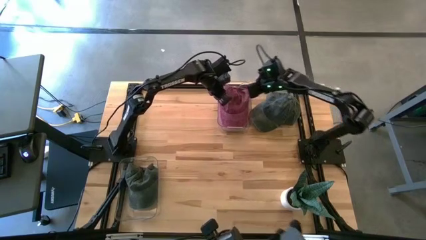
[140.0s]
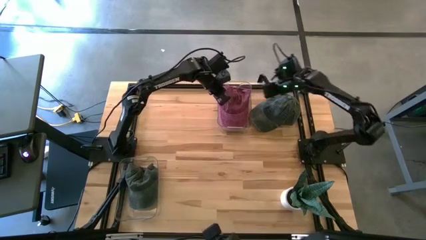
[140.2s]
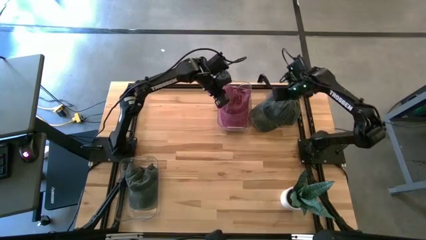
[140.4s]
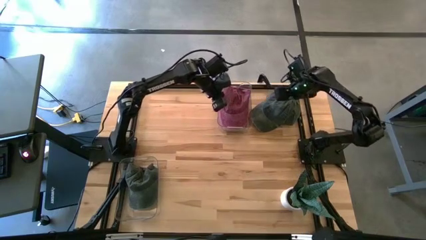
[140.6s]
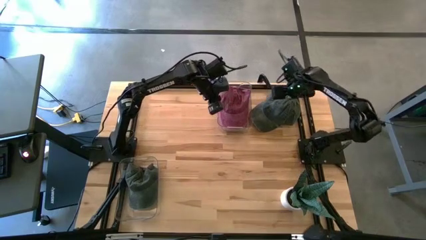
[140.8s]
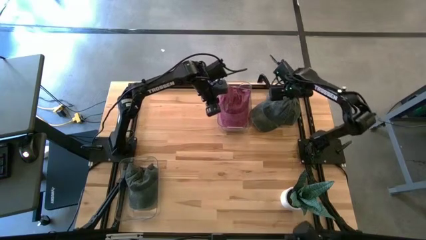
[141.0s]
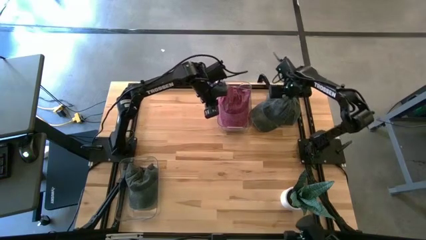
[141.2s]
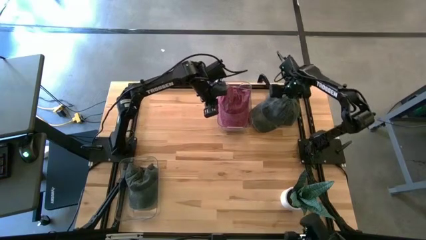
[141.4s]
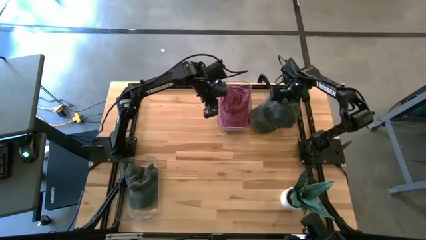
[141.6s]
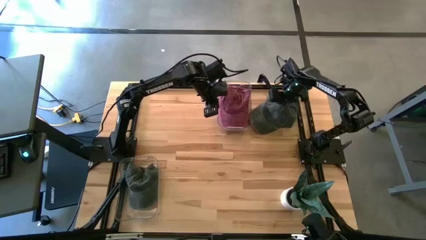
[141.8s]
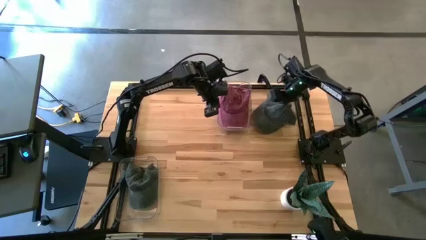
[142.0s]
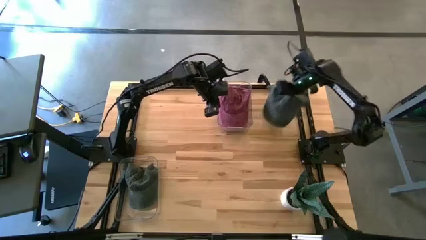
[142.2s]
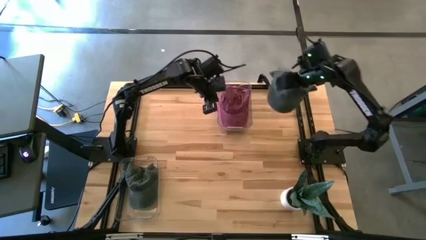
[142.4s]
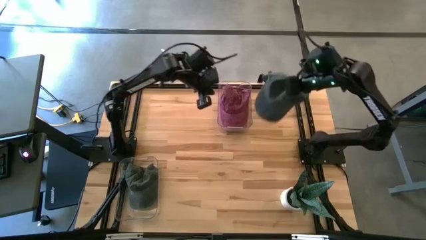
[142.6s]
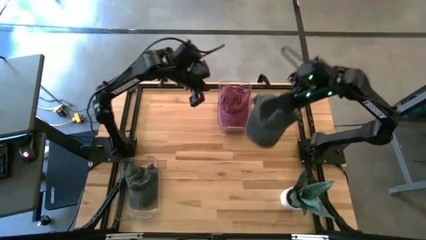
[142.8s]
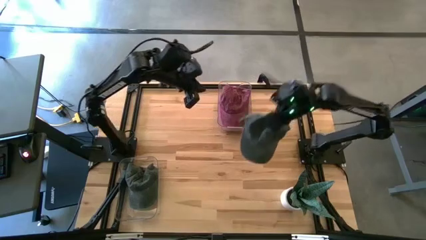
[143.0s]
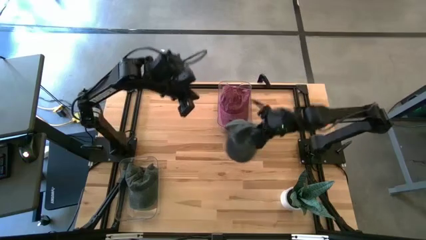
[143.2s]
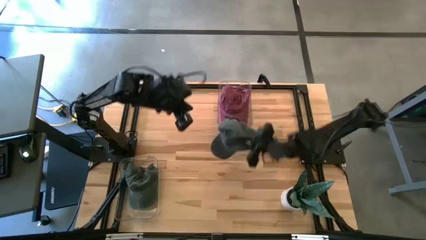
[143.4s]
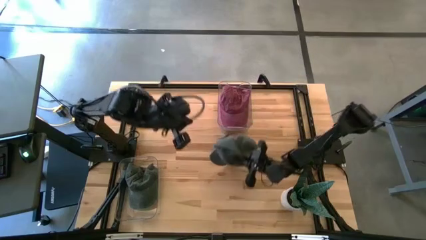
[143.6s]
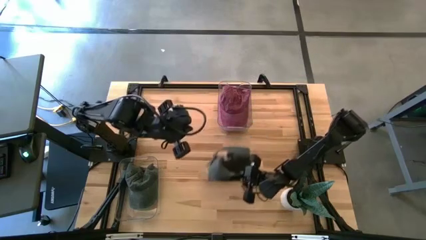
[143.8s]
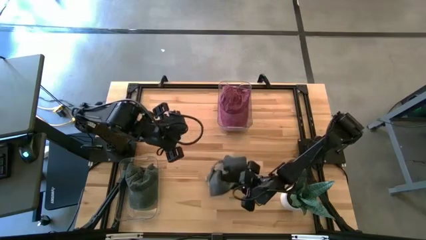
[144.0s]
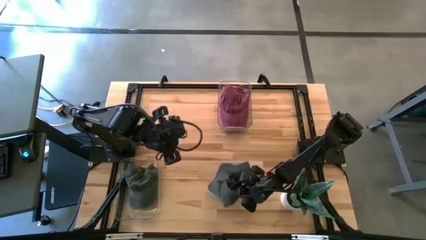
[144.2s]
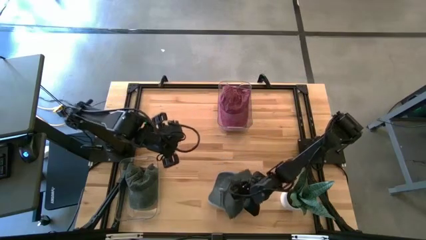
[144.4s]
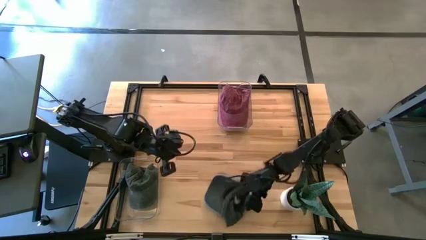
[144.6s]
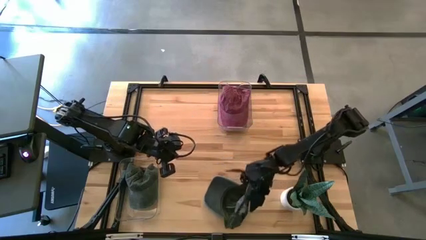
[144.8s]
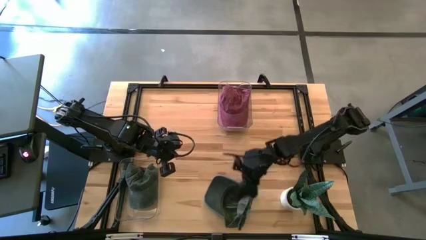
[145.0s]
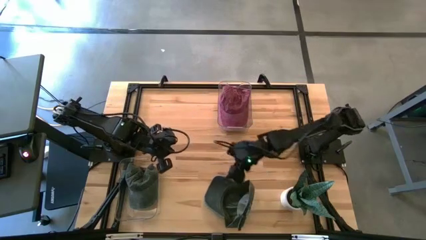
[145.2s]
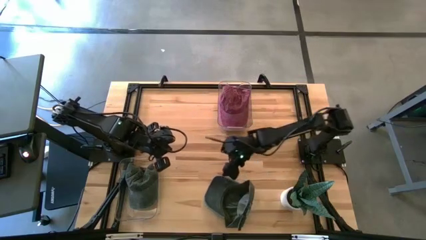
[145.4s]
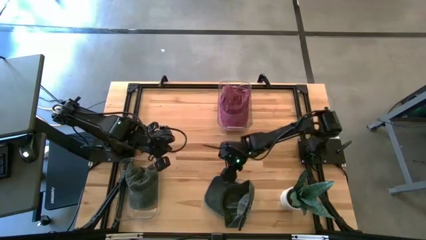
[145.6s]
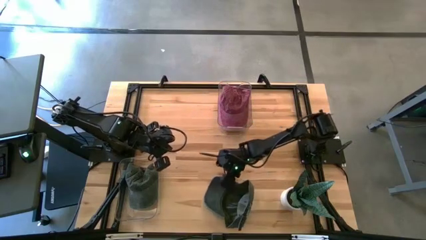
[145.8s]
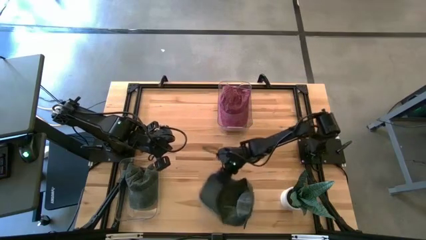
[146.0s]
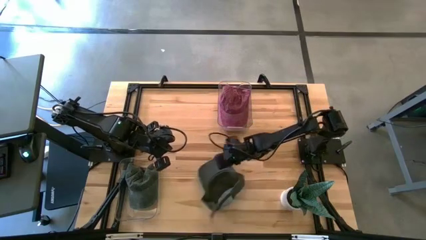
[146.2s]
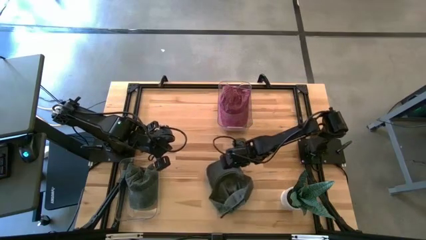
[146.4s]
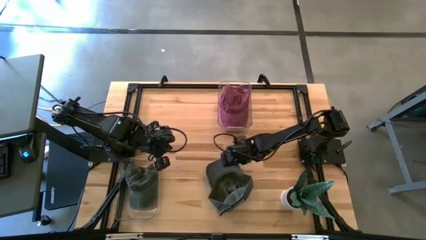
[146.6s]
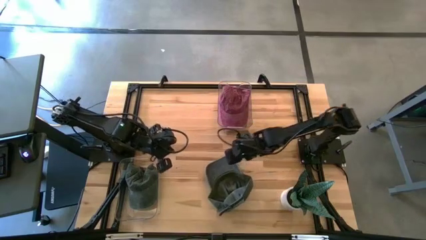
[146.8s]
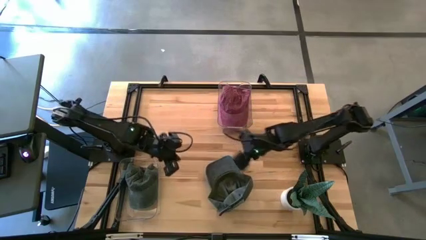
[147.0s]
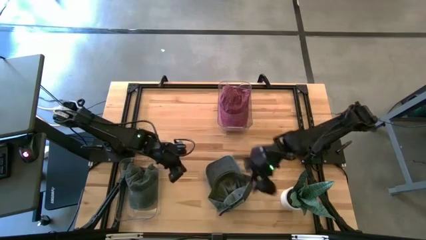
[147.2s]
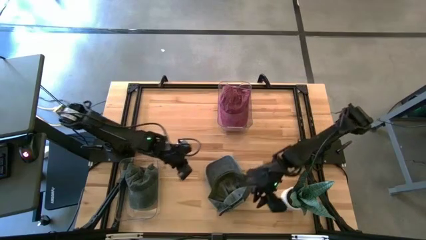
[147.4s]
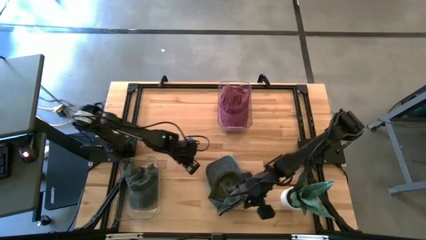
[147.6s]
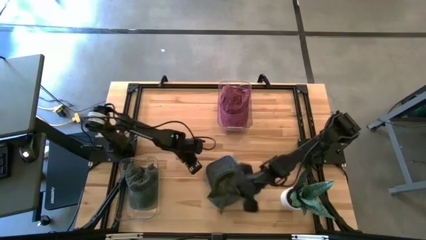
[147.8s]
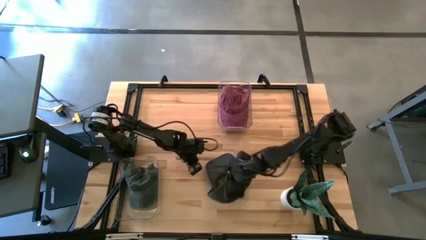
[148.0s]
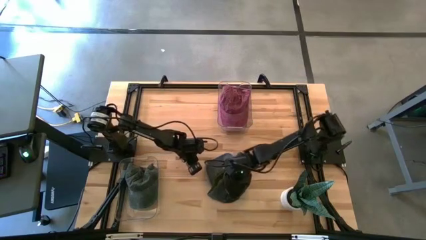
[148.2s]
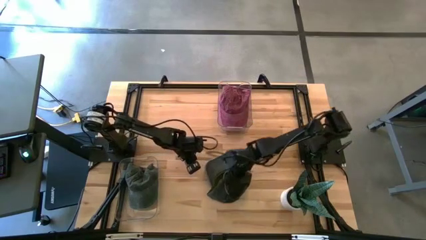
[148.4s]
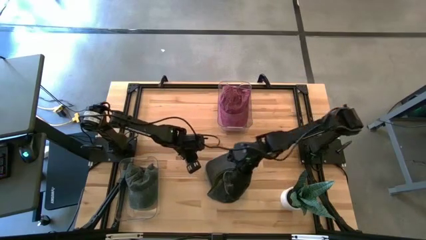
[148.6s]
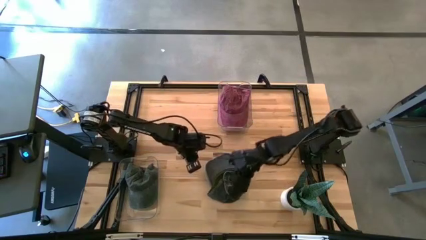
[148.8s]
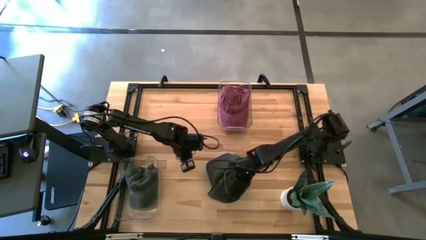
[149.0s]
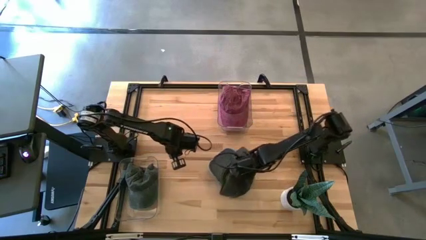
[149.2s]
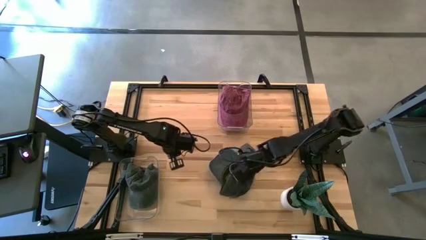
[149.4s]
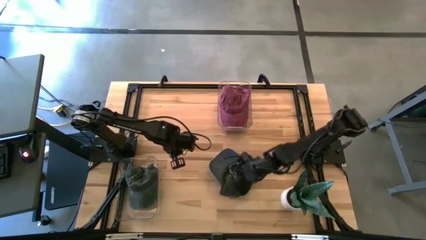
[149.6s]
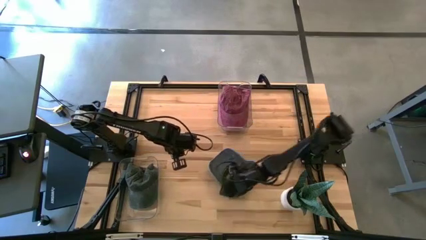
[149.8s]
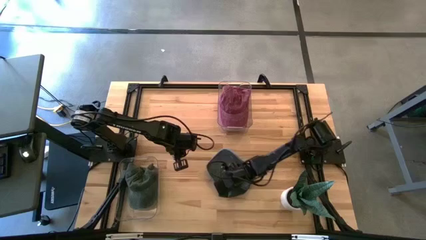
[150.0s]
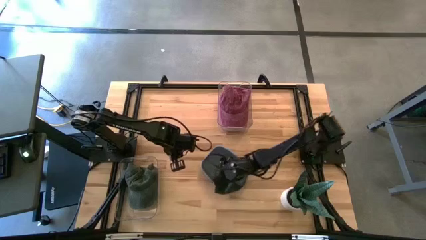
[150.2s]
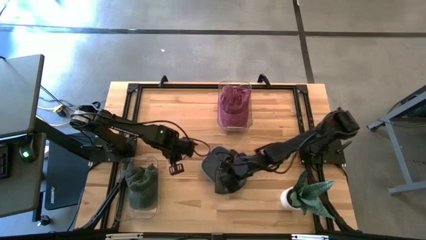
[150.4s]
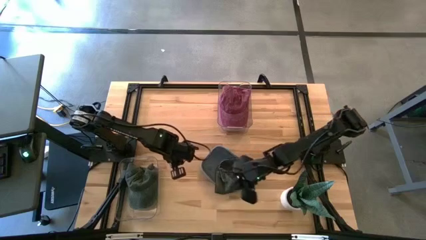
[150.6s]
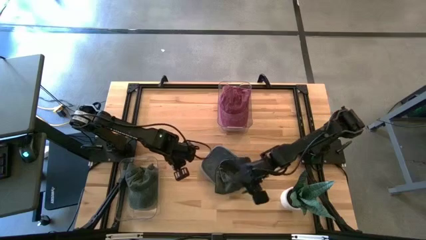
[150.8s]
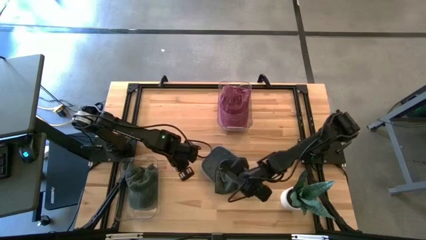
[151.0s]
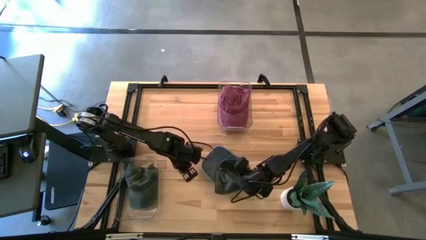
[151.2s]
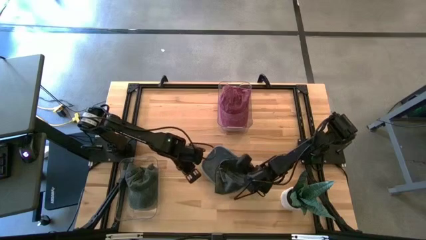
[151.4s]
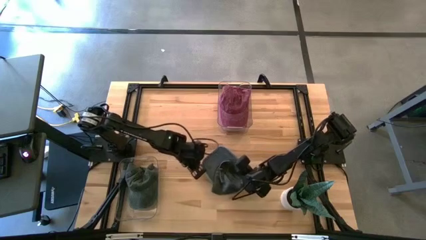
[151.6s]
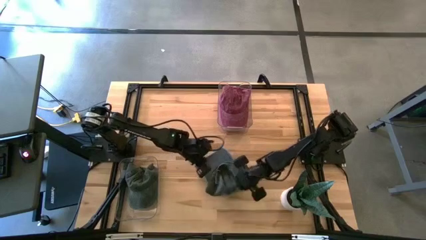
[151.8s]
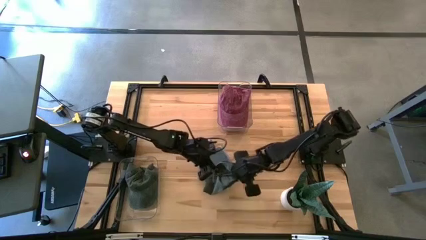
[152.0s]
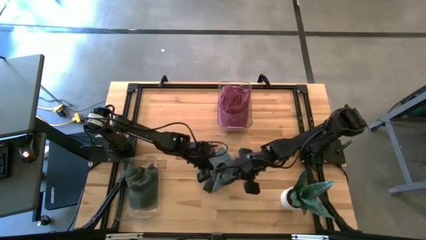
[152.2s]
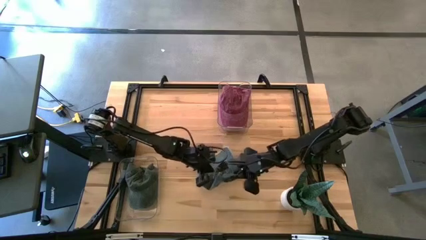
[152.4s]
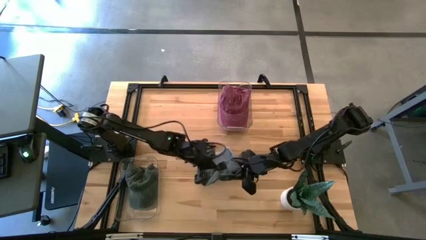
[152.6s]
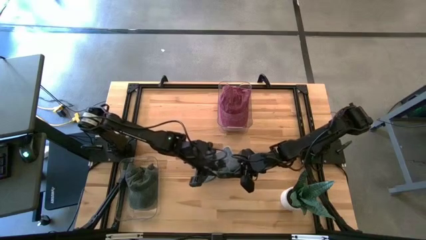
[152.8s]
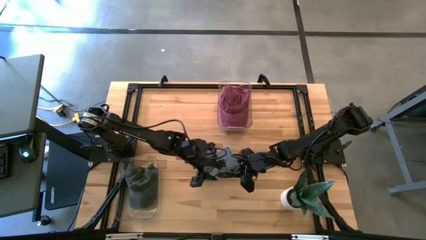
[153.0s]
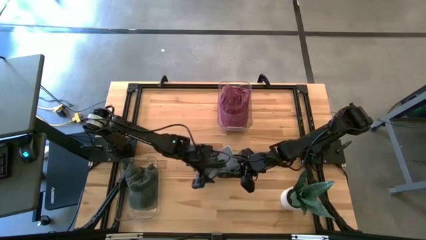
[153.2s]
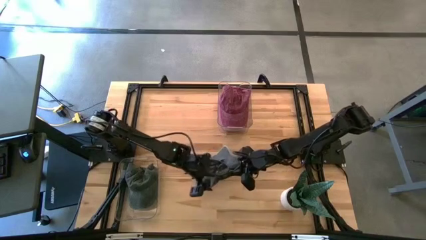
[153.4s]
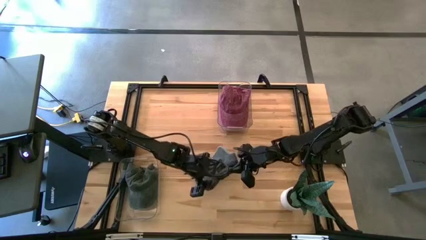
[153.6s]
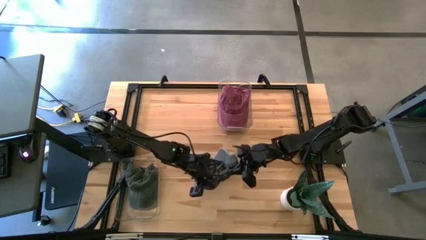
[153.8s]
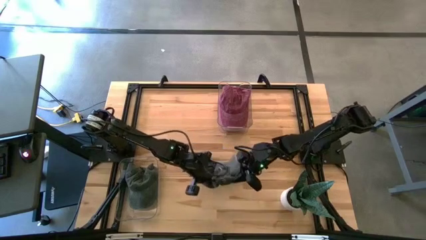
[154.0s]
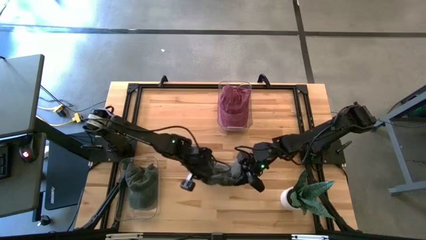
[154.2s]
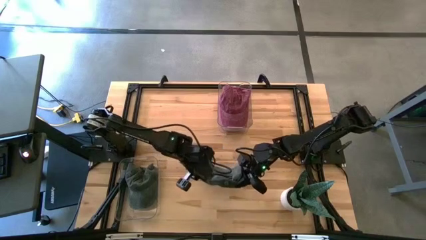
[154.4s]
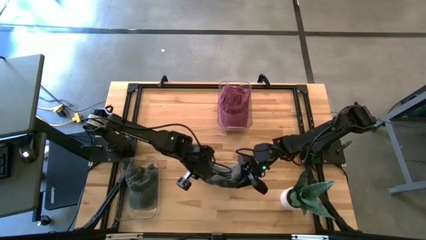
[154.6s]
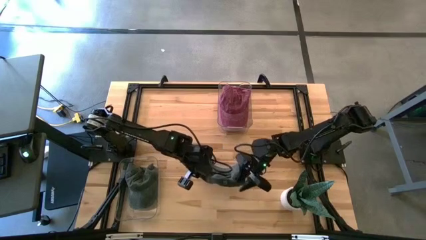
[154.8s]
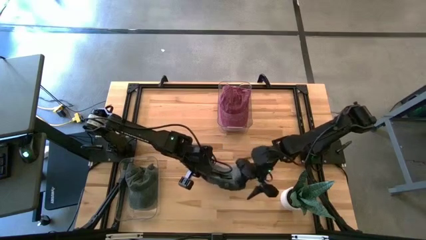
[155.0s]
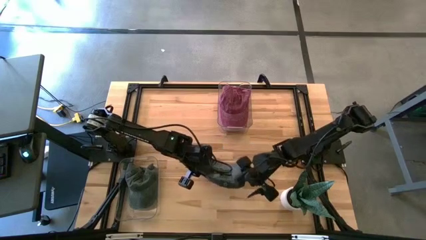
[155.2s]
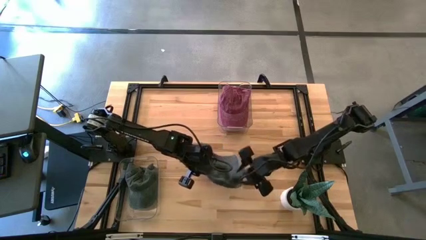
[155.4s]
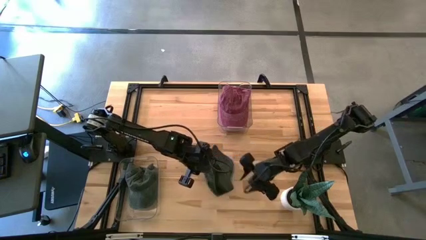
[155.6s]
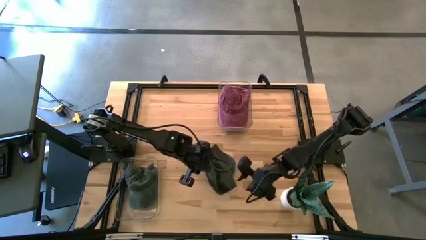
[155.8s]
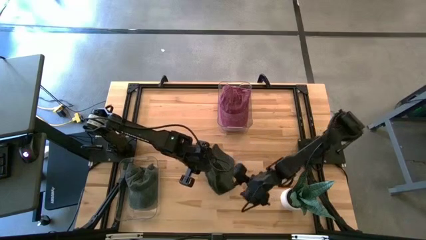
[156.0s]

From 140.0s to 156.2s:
Task: Pick & Place hat
Put the black cap into the bottom transparent bin
